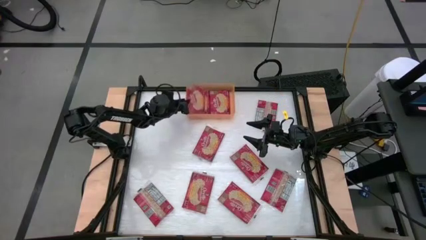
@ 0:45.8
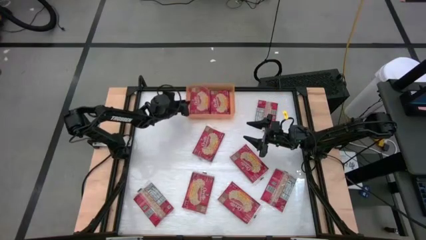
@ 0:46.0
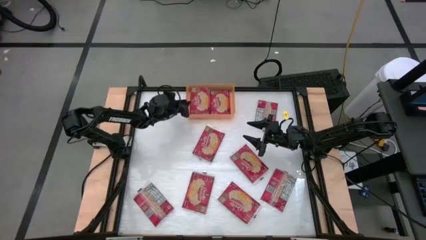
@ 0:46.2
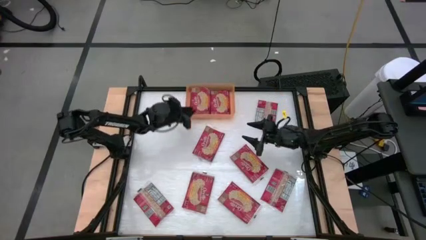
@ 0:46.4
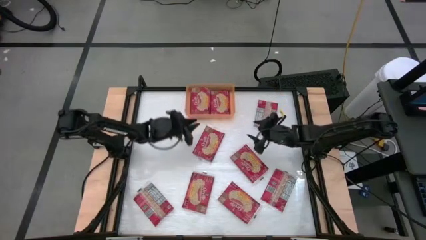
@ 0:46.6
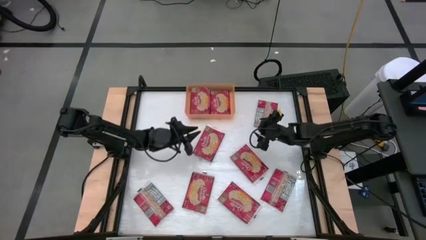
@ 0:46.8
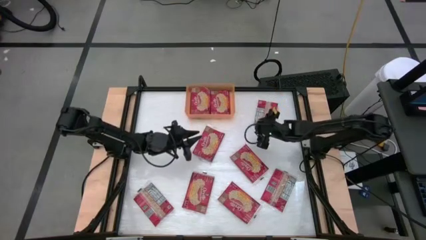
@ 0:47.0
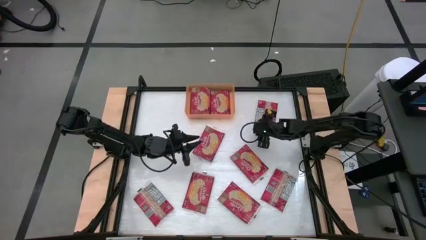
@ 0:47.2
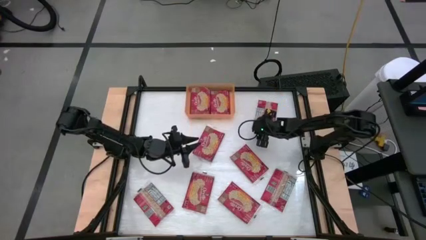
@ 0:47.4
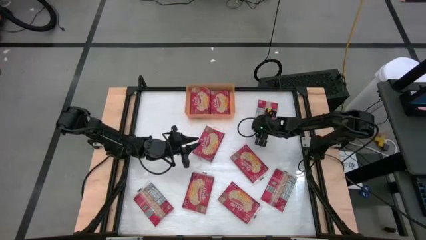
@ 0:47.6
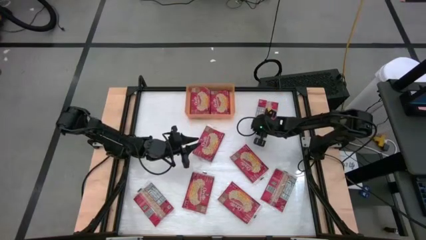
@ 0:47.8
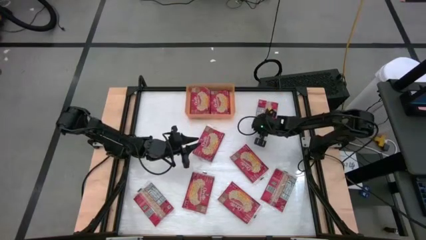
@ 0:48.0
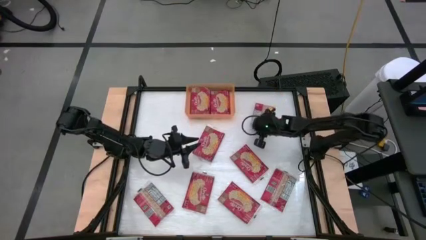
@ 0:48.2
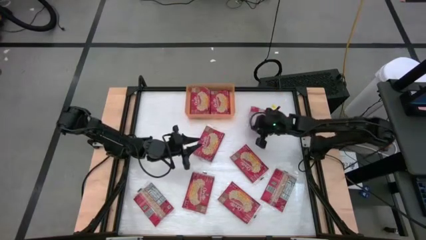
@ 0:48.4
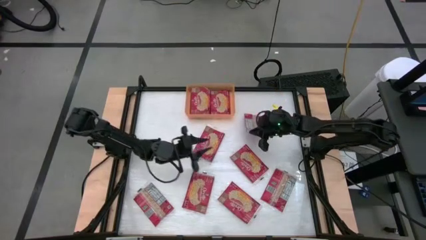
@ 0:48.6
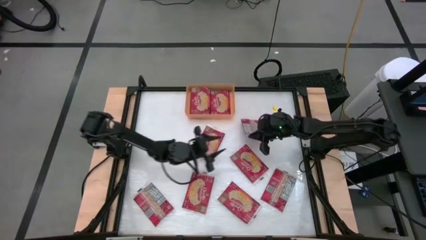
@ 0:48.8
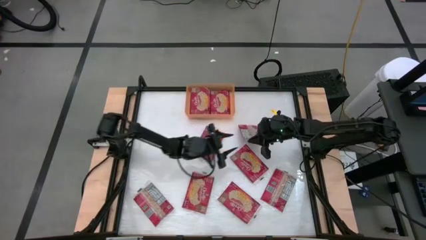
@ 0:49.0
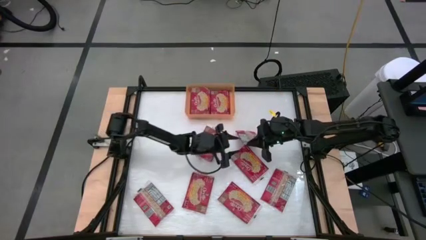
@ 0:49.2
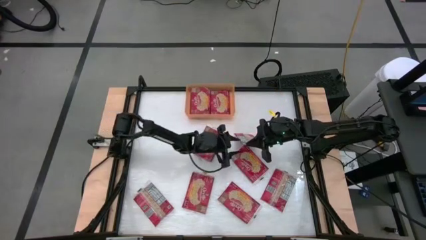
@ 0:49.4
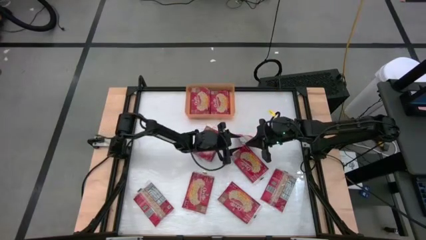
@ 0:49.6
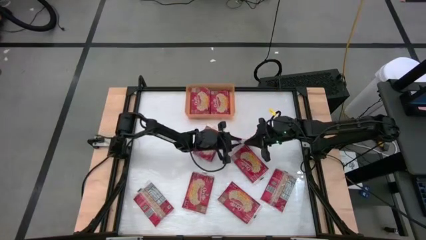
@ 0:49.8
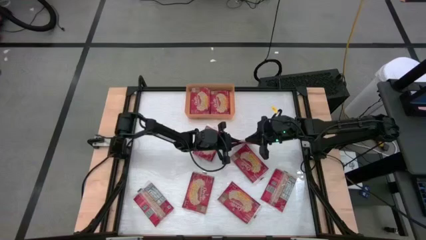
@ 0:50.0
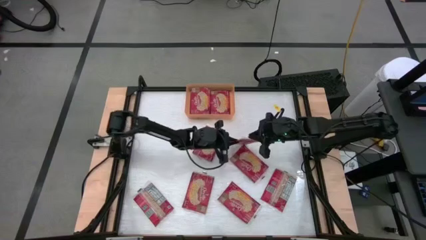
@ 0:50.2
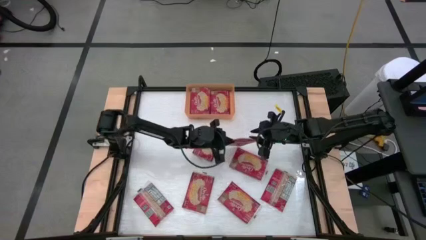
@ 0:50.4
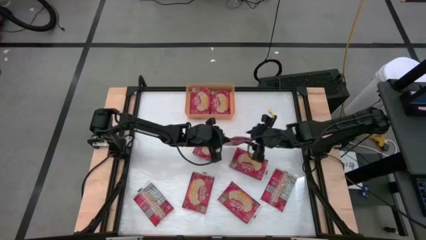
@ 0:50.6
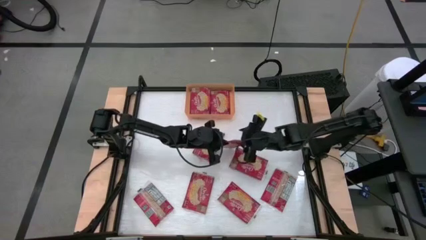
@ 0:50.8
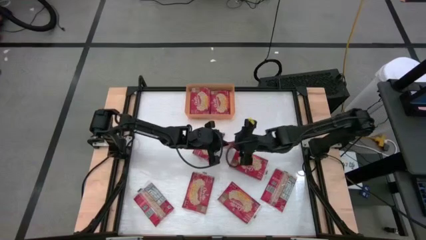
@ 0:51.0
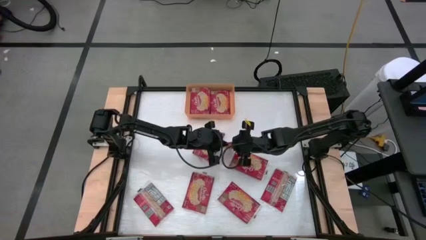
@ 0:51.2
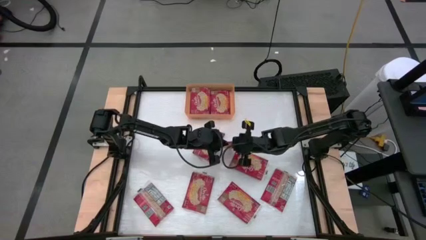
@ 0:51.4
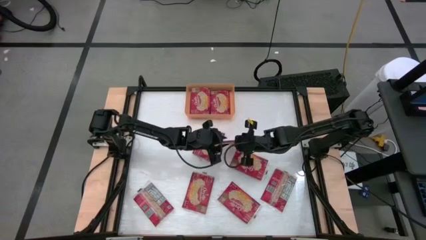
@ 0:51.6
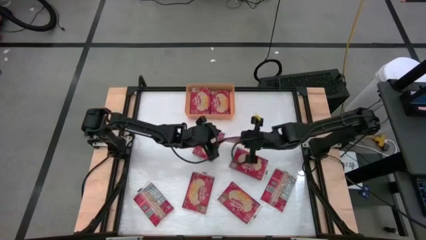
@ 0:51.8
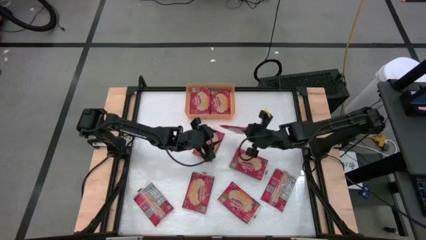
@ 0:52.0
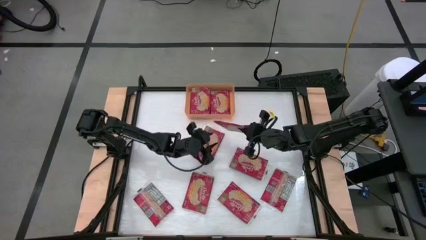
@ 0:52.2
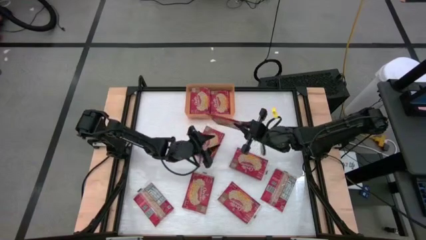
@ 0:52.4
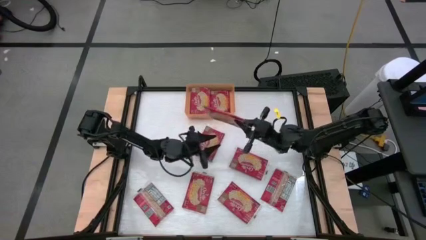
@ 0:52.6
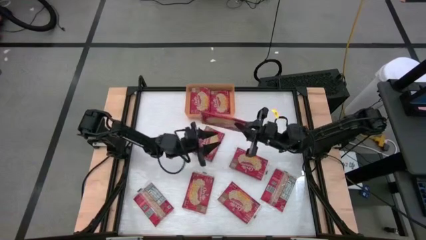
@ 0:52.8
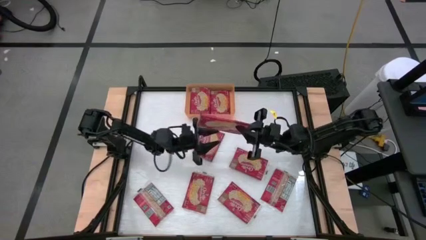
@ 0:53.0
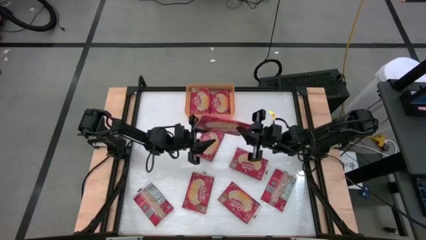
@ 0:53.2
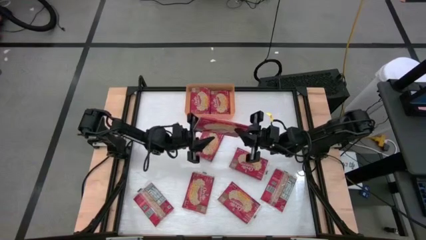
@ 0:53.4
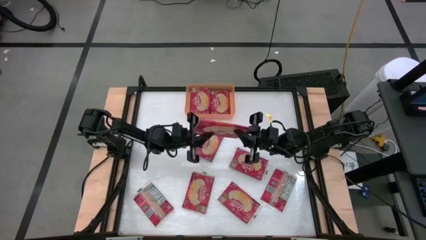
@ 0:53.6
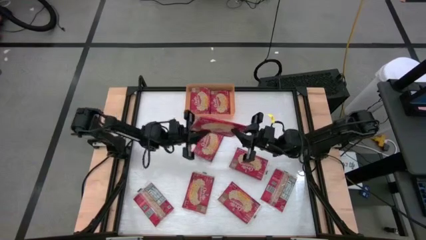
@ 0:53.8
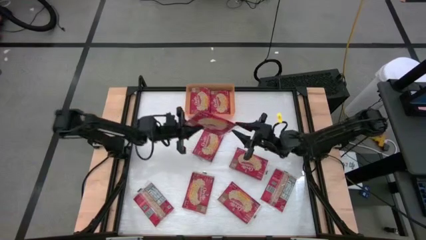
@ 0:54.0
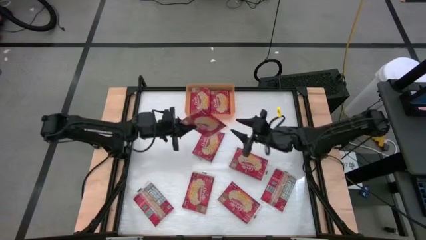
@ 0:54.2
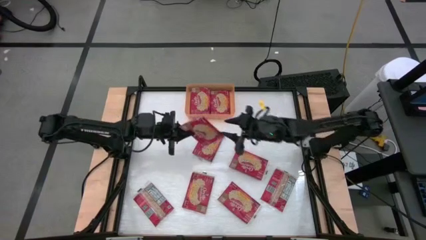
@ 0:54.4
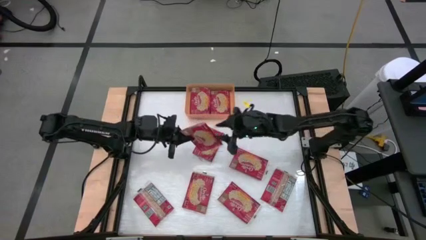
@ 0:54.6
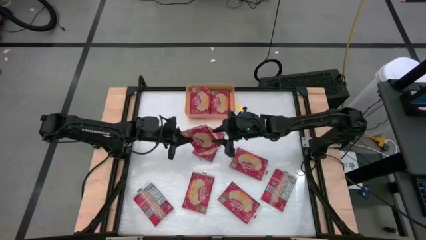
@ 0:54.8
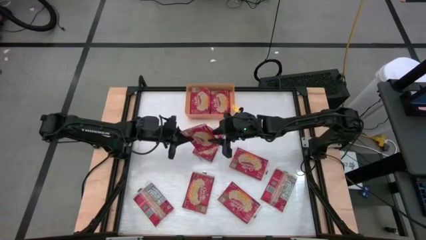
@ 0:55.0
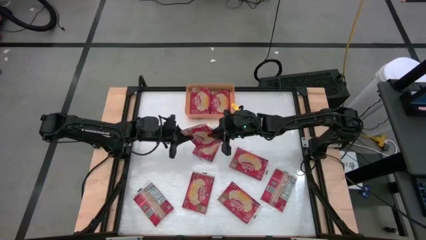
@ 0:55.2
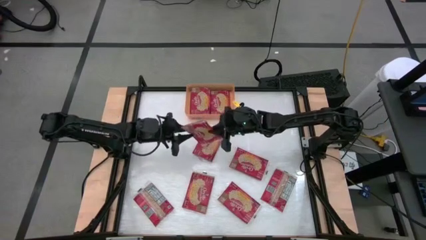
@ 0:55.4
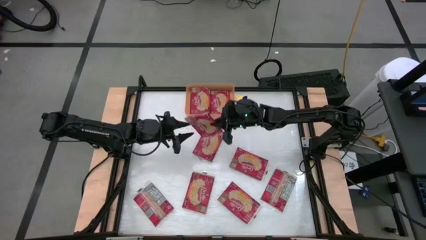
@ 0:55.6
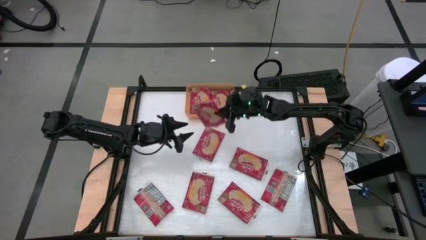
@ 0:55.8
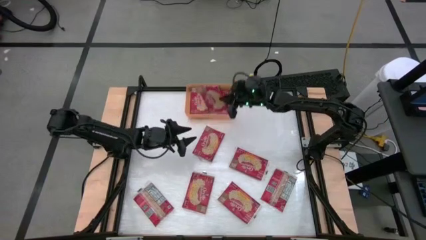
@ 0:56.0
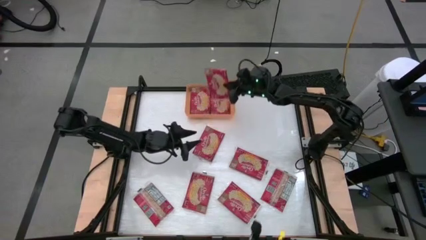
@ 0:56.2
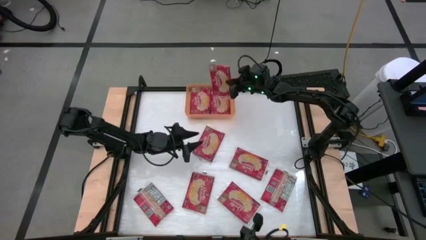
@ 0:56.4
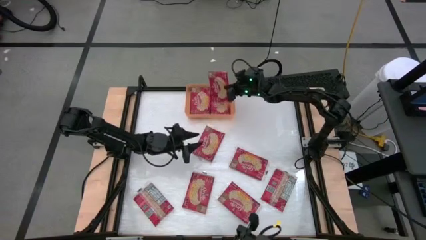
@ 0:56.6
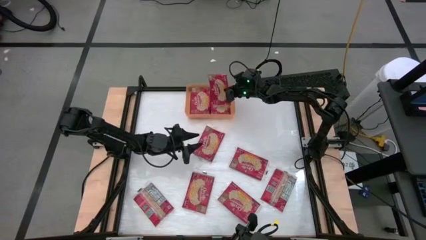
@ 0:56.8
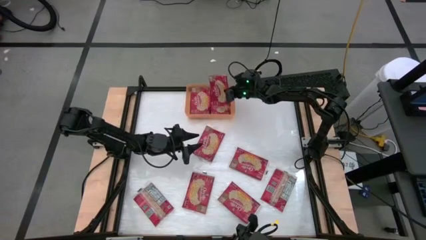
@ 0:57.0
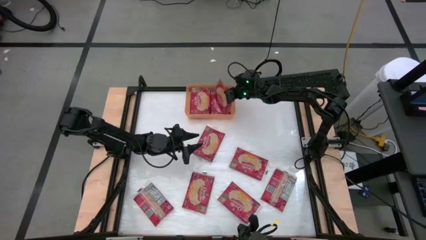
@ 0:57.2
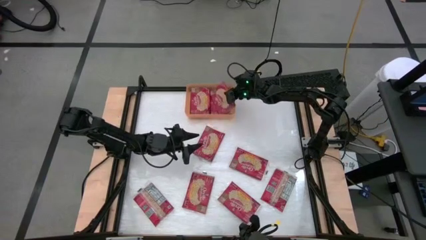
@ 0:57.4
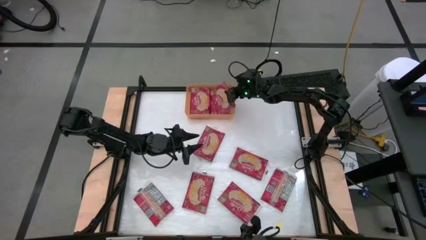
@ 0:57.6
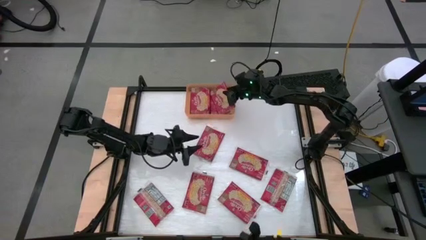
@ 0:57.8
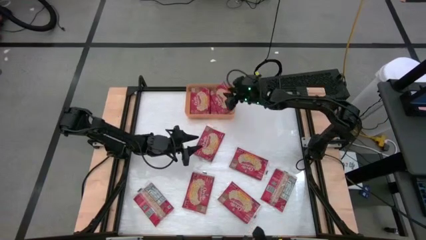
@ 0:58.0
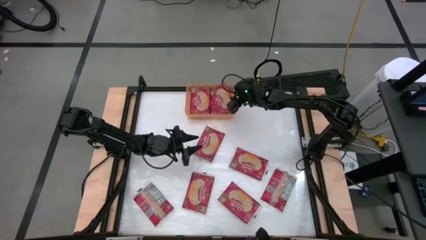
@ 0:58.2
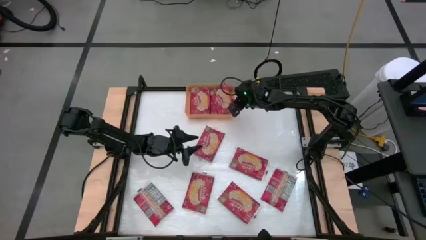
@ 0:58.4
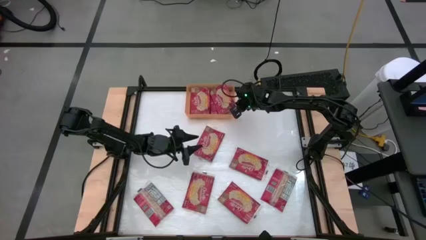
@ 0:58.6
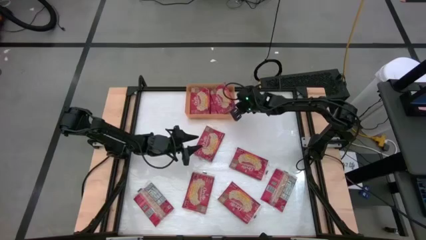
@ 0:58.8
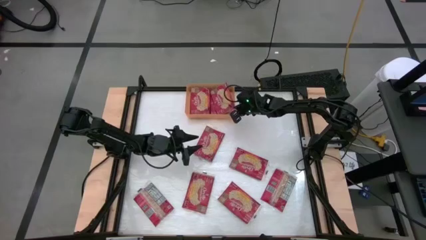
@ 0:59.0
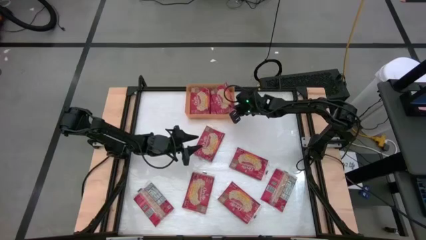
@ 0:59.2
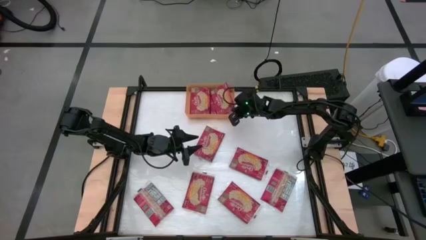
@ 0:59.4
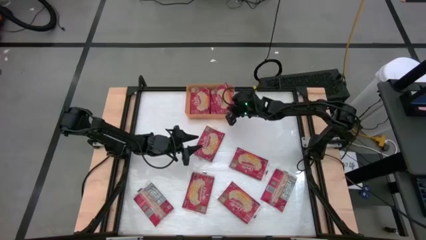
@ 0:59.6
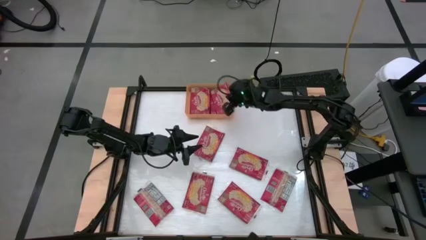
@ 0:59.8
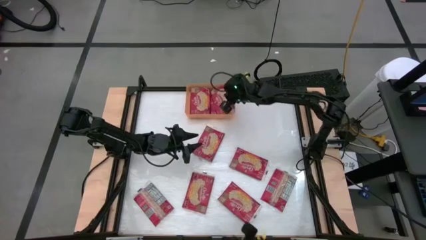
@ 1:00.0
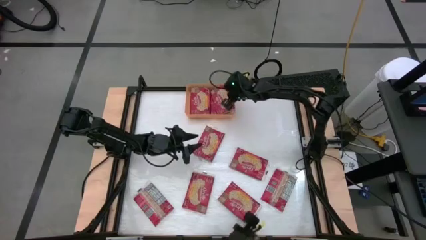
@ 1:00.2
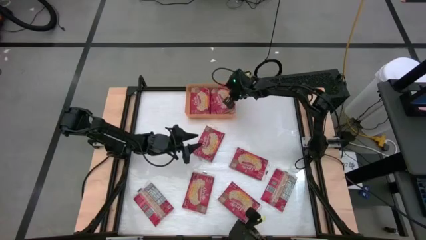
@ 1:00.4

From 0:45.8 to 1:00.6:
Task: Sort popcorn bags into baskets
Put the red popcorn bag into the orange bin

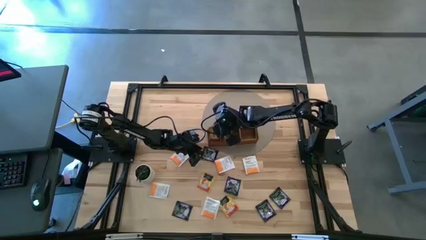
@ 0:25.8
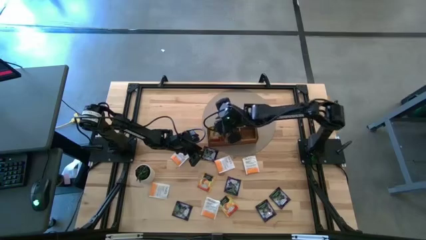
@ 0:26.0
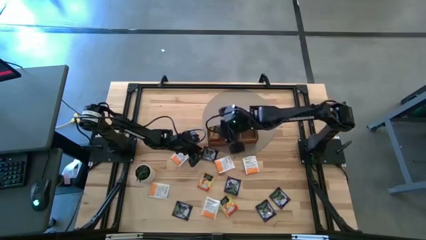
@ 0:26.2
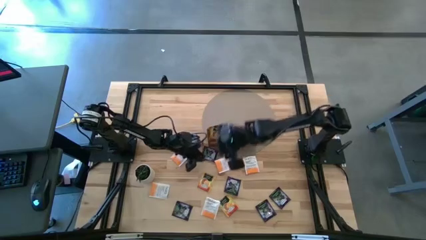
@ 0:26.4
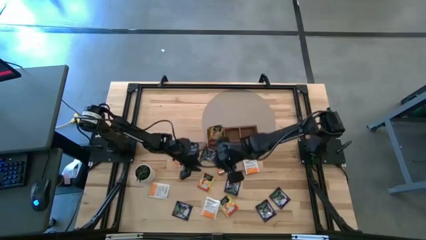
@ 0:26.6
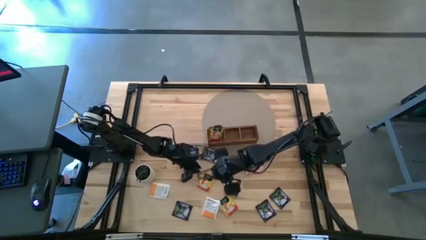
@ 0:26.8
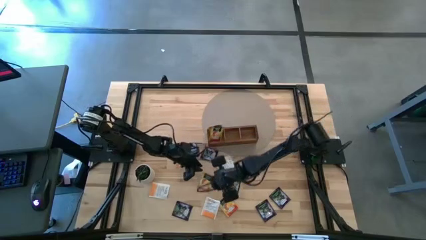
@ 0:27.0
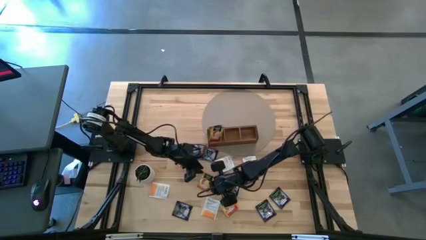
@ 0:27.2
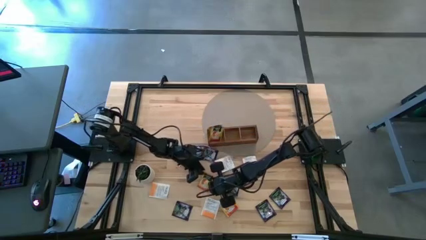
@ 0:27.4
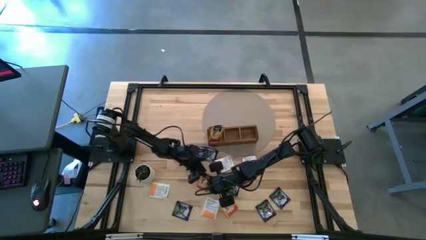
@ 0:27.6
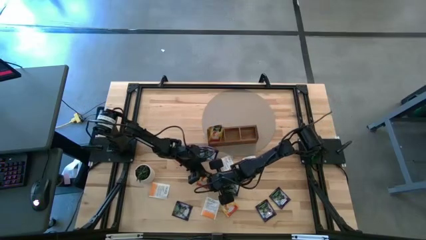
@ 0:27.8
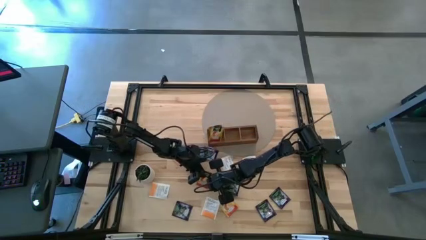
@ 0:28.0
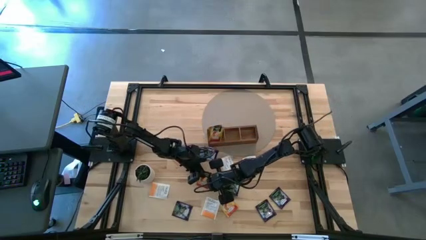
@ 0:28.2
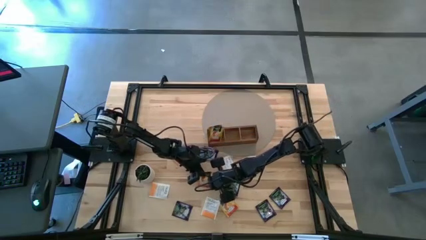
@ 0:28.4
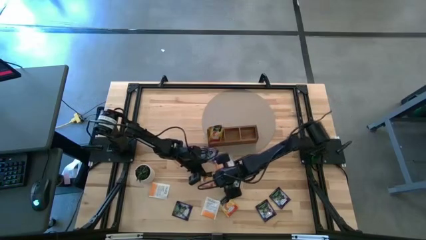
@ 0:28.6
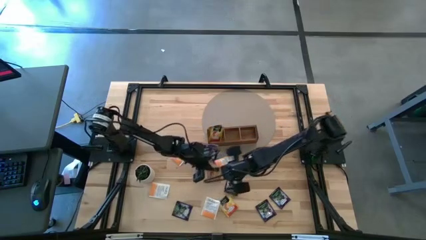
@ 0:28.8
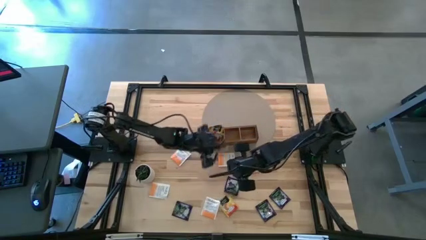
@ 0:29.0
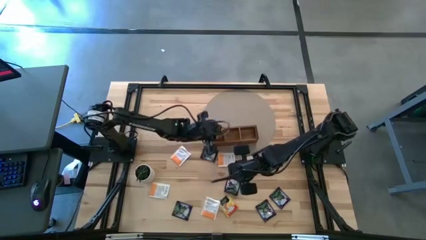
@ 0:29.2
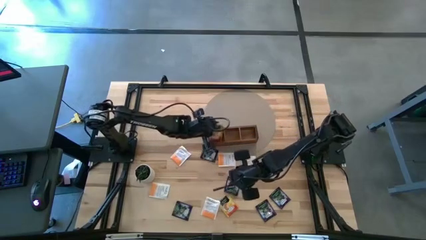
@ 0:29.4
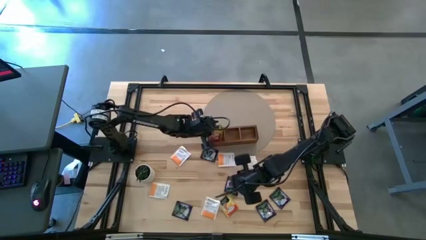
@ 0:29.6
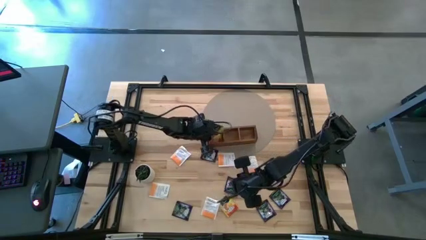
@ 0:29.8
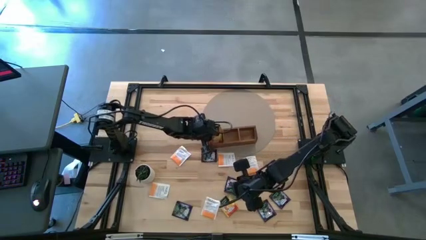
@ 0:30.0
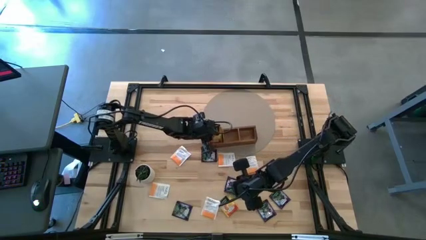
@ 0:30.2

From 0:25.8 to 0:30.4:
Task: Pick & Place Tea
Put the yellow tea bag into the left section of the wooden organizer
